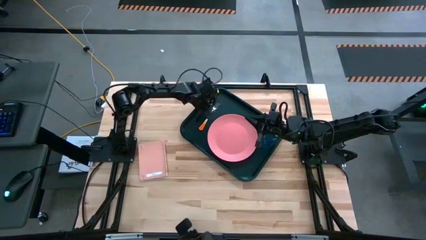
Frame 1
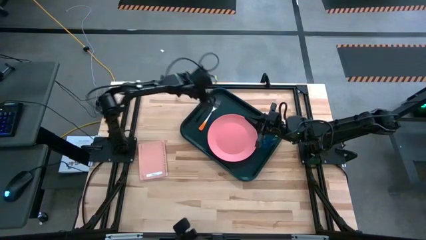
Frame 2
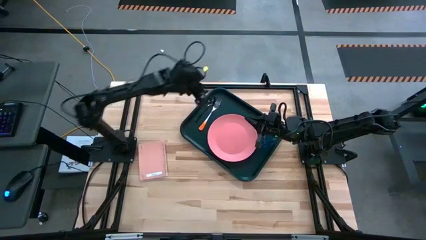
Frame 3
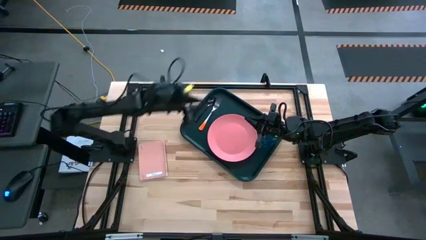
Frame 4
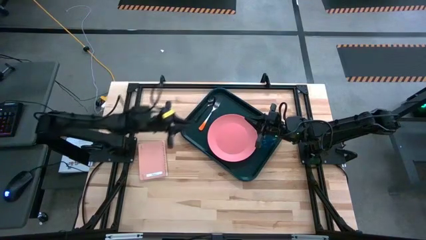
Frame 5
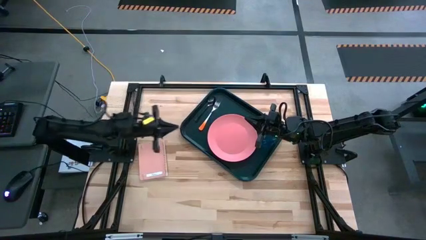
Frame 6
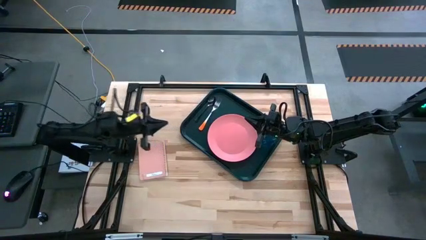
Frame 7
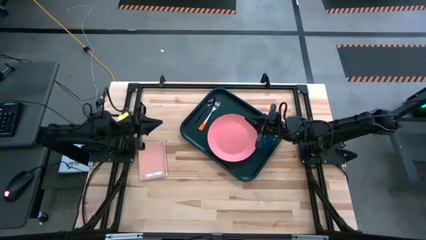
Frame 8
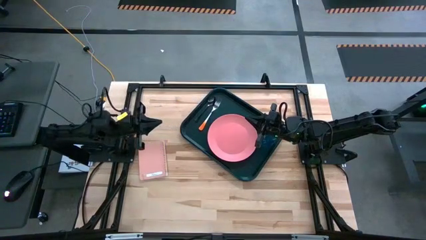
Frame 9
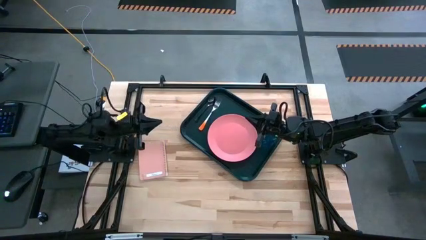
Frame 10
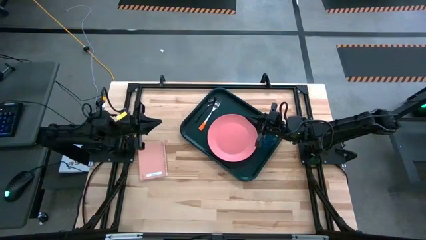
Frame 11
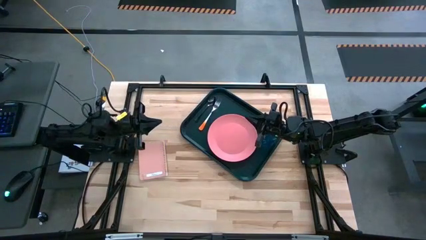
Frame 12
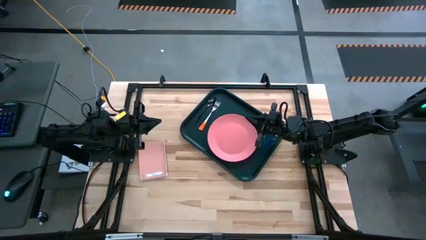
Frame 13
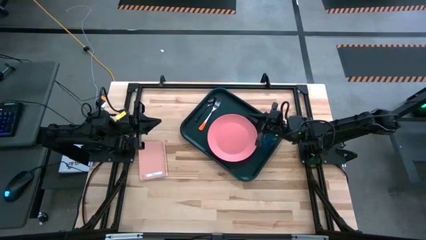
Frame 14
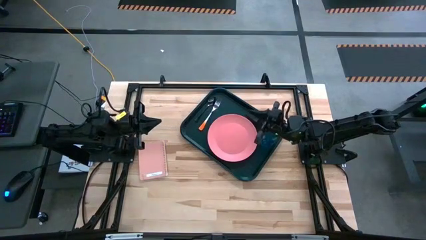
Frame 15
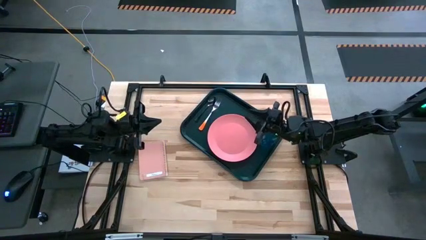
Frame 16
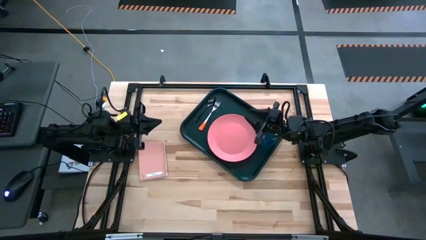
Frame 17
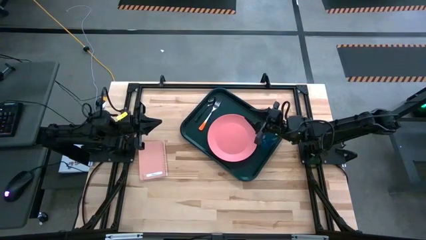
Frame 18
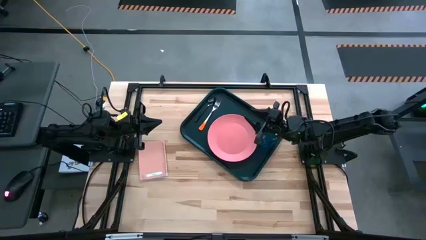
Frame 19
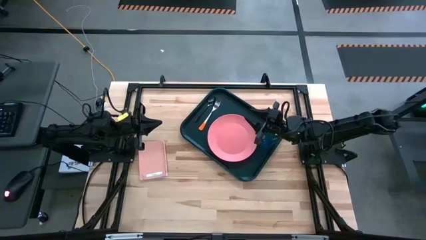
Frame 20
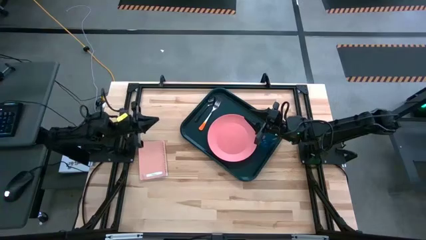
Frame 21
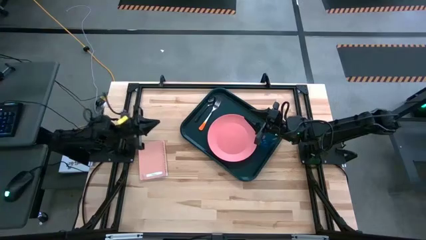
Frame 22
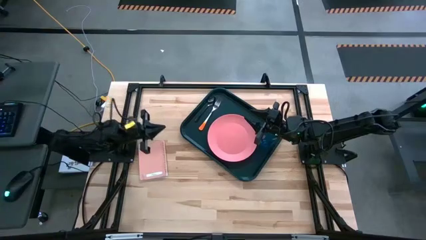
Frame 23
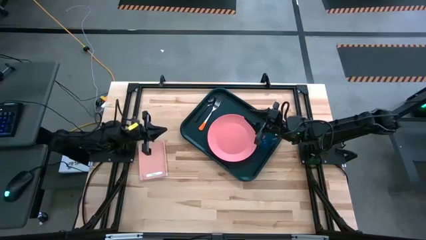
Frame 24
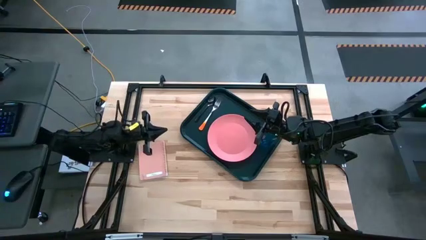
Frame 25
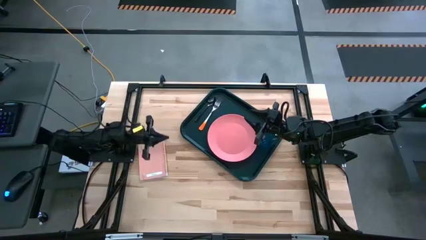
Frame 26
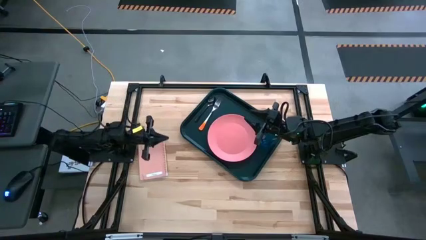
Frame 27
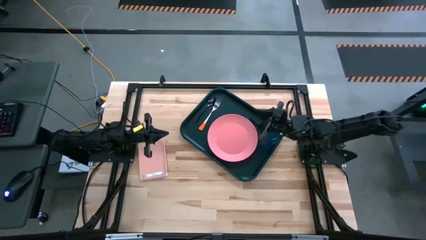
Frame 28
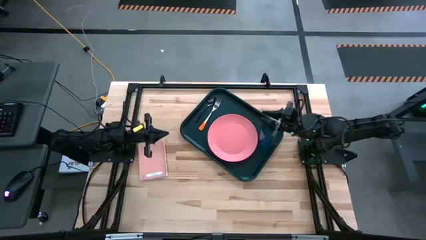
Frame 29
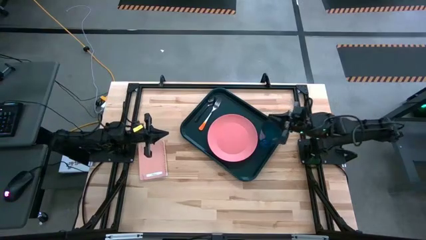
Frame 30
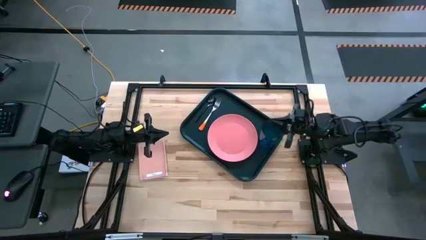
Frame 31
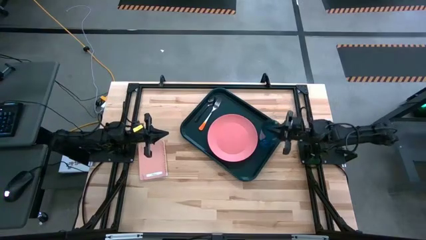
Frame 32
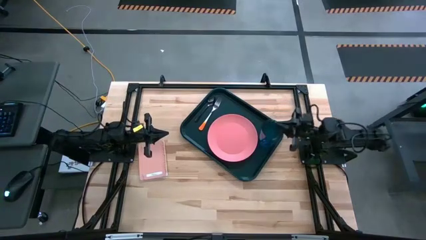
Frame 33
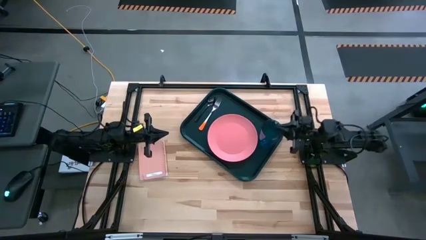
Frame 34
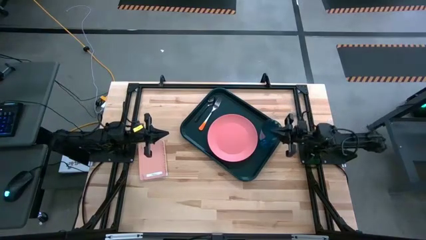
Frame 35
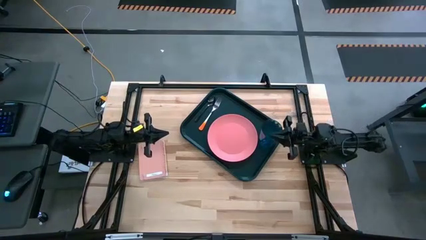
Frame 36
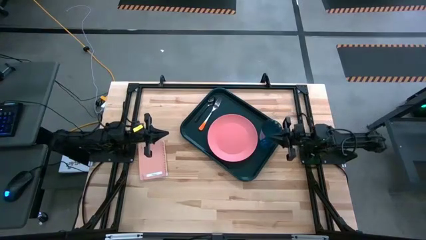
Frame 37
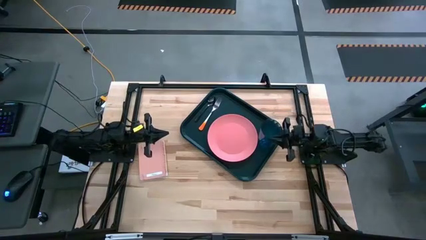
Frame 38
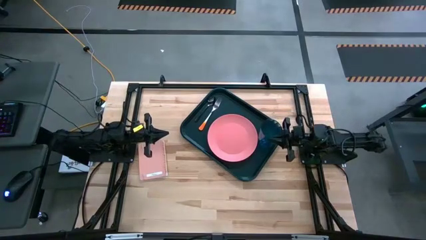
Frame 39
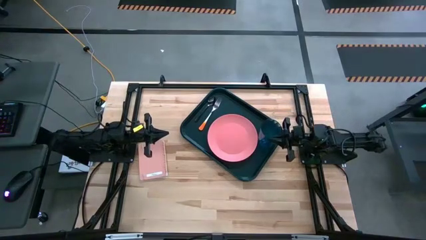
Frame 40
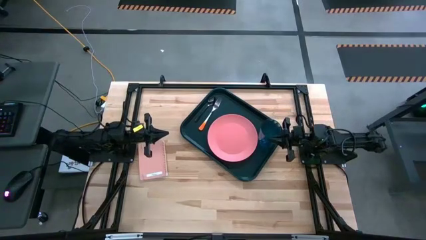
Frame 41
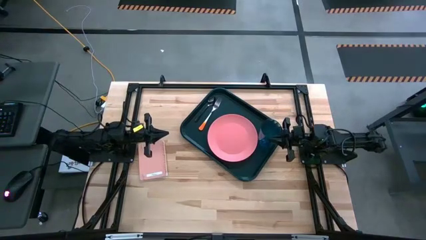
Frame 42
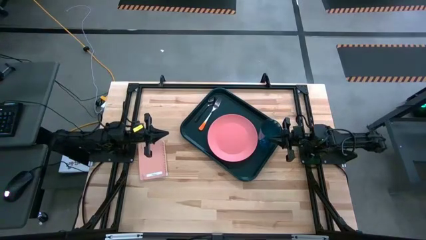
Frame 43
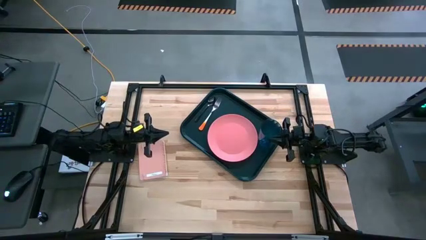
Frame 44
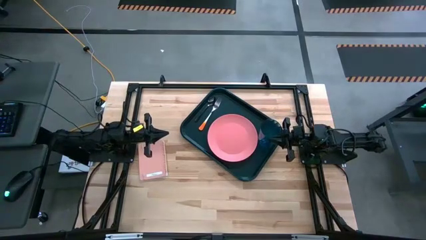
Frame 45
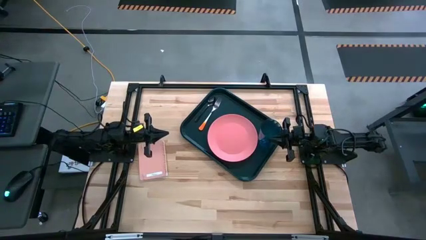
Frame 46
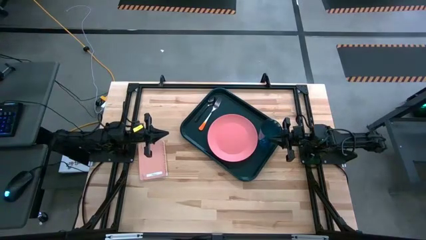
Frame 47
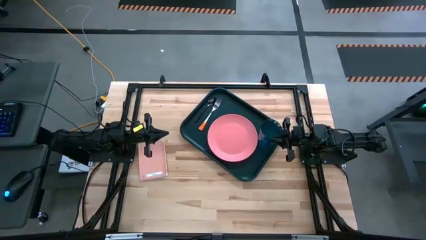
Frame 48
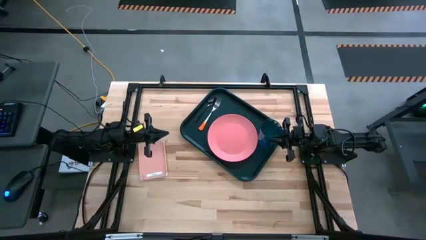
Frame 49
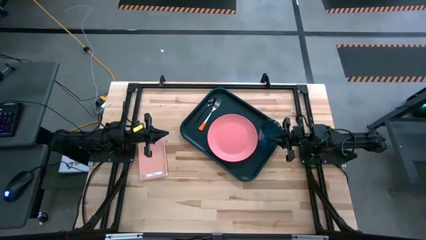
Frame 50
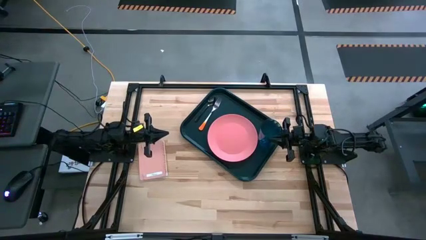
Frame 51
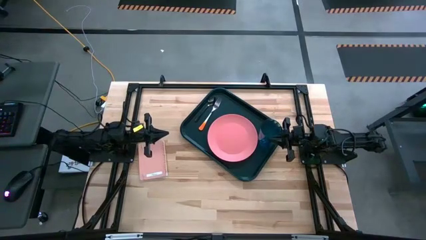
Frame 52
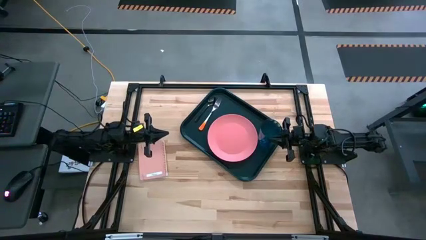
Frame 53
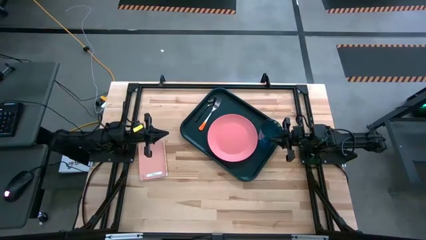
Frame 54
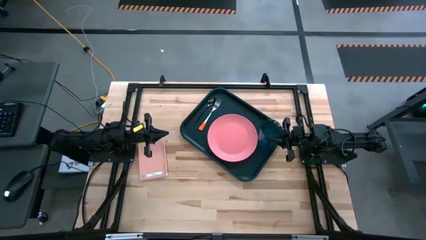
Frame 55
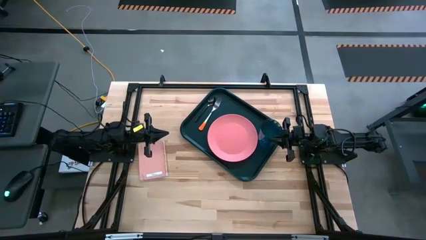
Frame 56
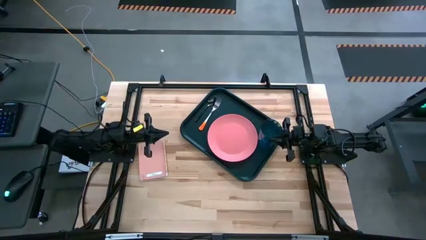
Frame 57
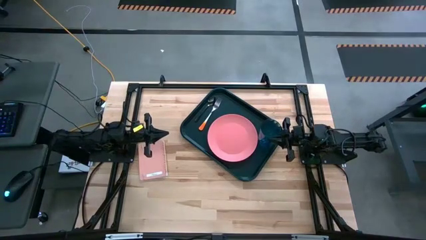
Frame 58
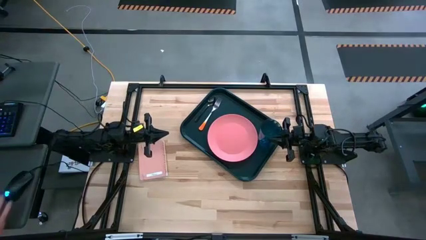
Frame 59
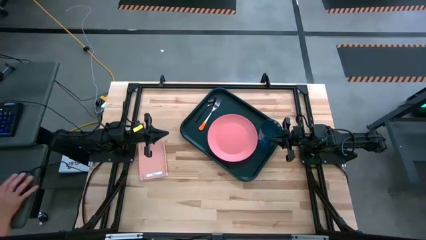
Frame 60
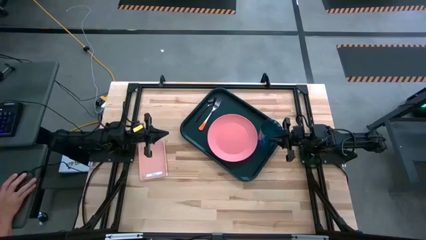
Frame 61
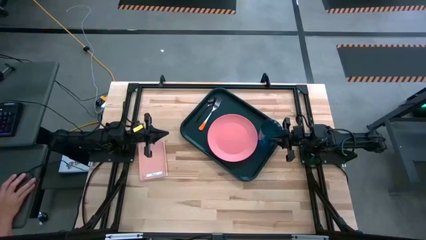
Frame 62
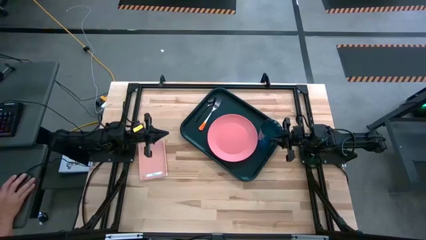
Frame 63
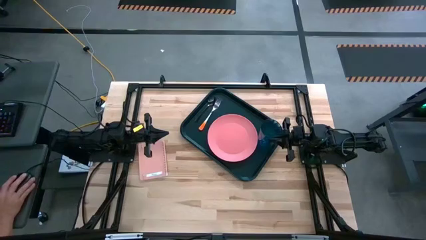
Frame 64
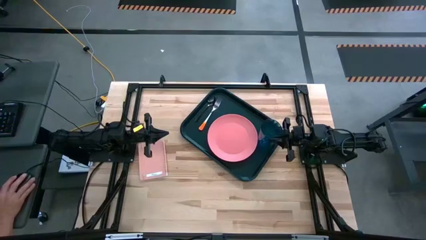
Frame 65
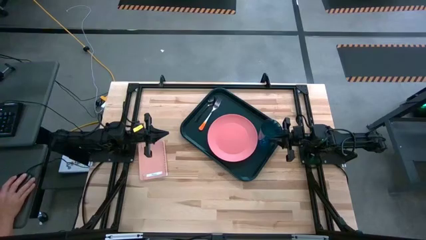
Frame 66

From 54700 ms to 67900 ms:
Task: Pick and place plate/cup/fork/spoon on tray
Return to Home Position

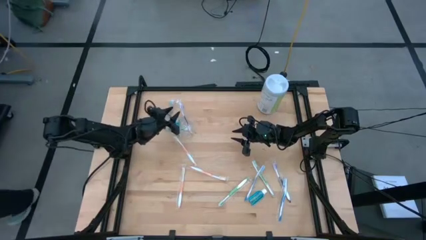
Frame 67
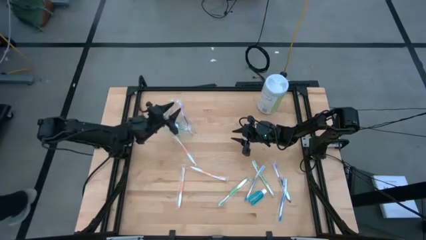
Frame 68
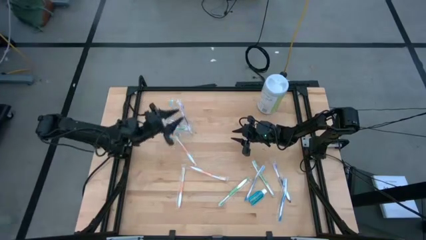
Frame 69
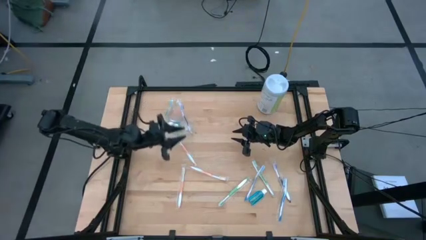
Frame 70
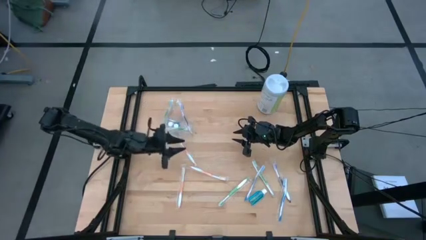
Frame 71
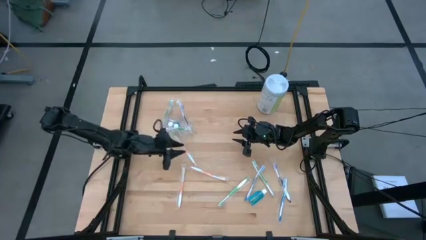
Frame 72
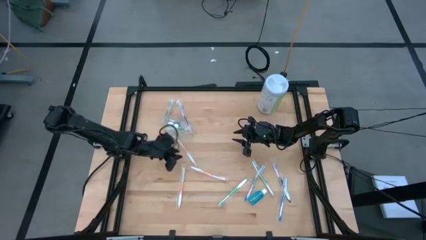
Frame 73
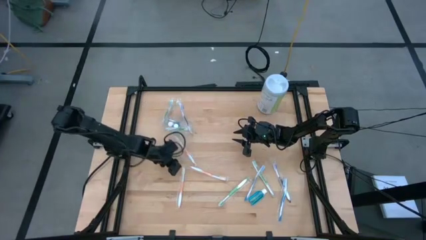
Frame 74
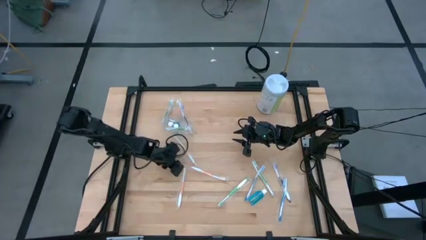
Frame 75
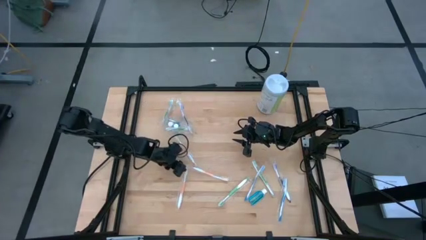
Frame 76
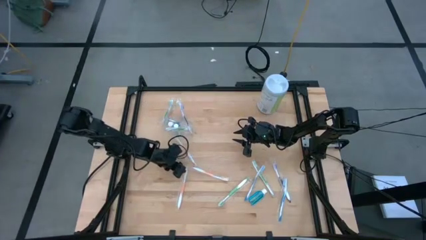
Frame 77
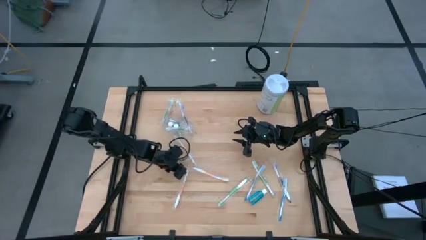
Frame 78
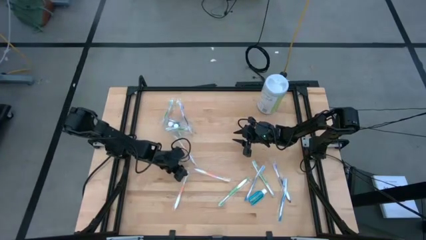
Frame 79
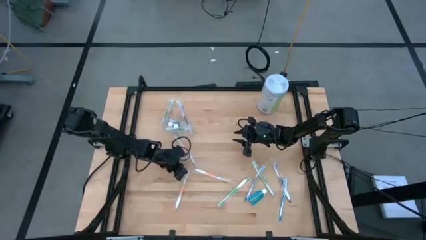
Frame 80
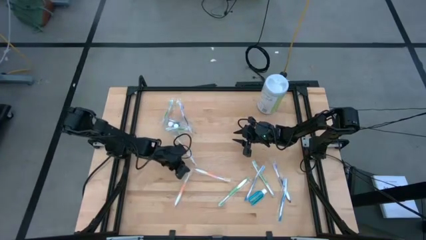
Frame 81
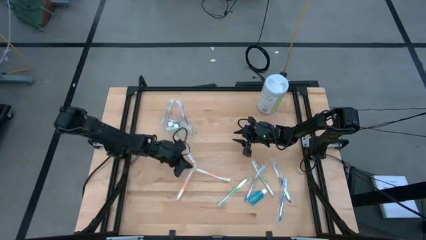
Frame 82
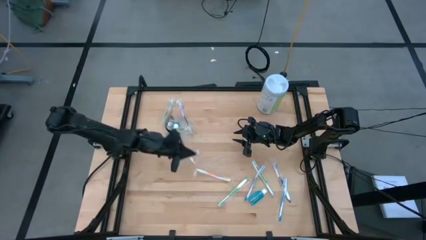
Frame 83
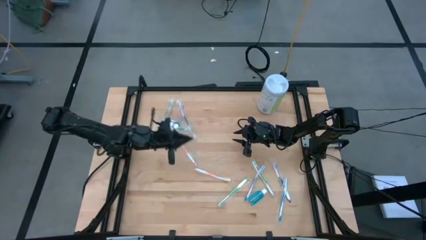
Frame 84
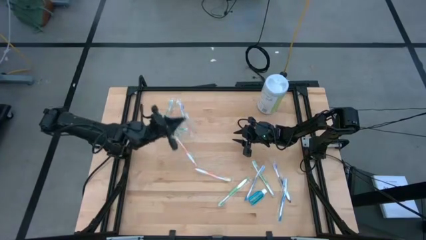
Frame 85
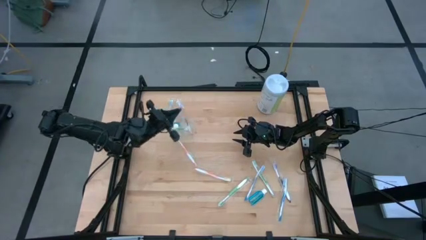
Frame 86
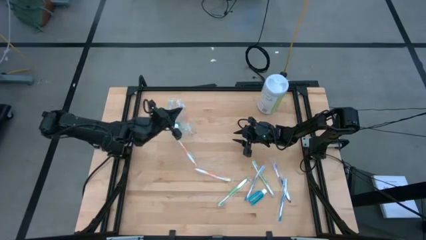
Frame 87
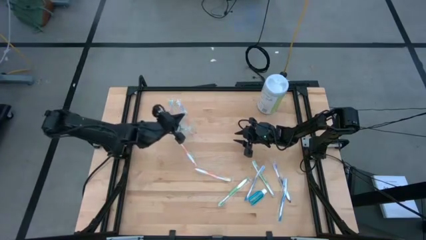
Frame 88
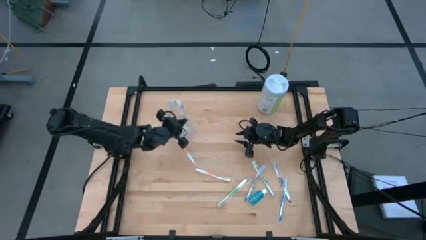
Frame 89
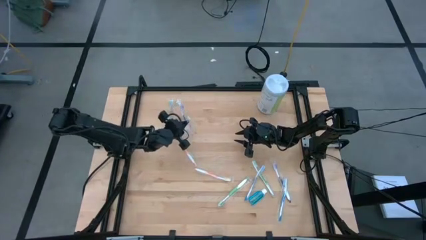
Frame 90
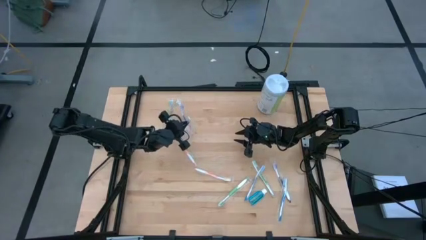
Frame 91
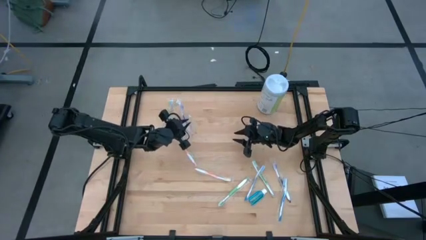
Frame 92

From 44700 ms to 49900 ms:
Task: Pick & Place toothbrushing station
Put the orange toothbrush into the transparent organizer
